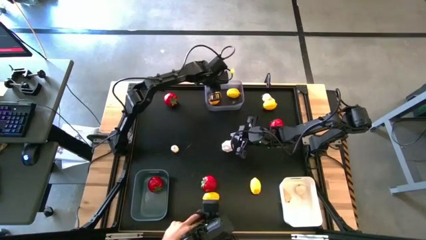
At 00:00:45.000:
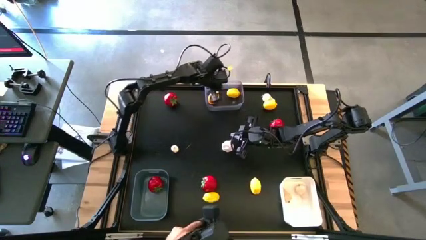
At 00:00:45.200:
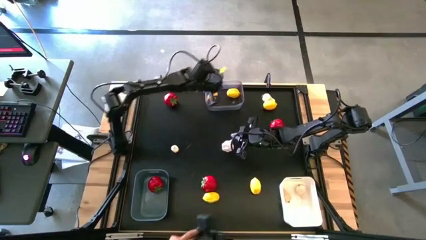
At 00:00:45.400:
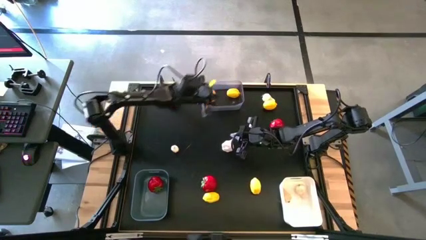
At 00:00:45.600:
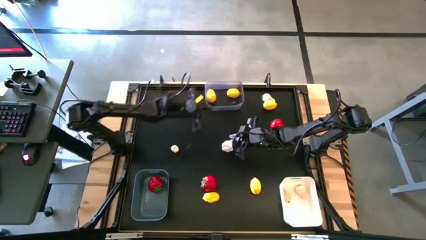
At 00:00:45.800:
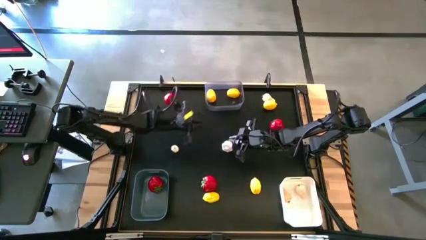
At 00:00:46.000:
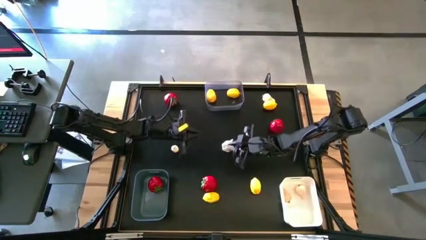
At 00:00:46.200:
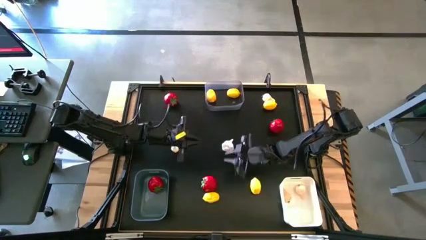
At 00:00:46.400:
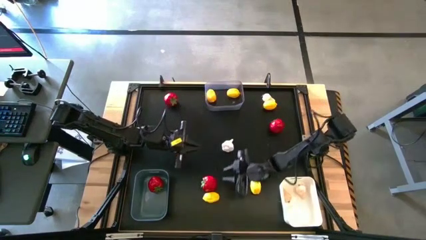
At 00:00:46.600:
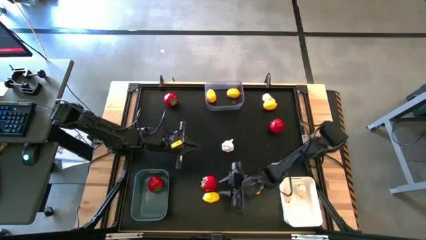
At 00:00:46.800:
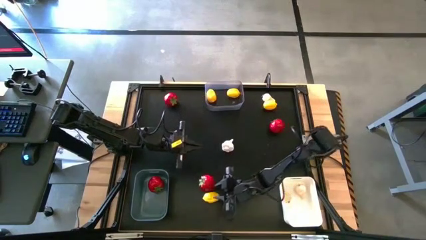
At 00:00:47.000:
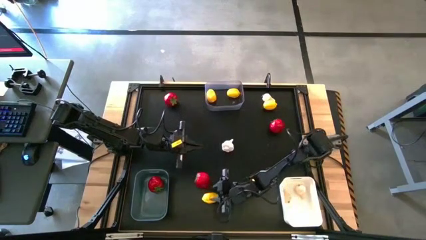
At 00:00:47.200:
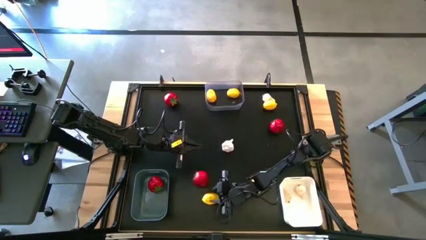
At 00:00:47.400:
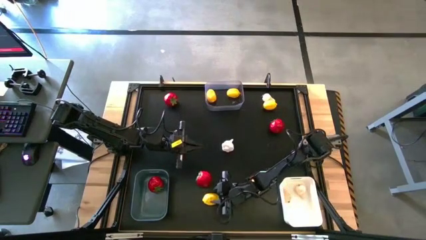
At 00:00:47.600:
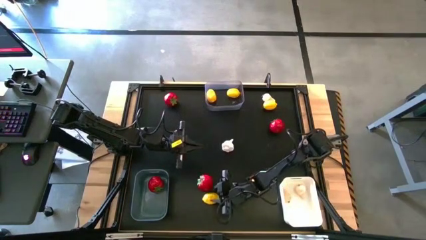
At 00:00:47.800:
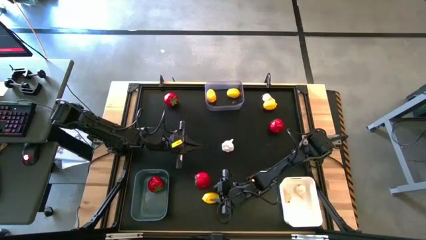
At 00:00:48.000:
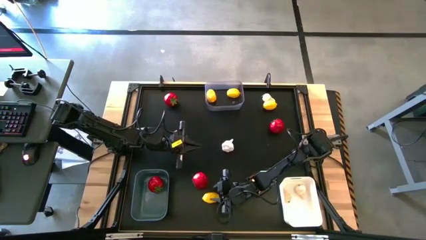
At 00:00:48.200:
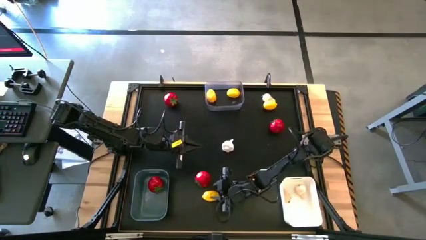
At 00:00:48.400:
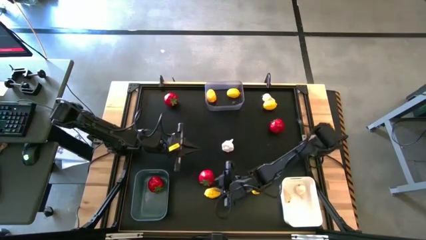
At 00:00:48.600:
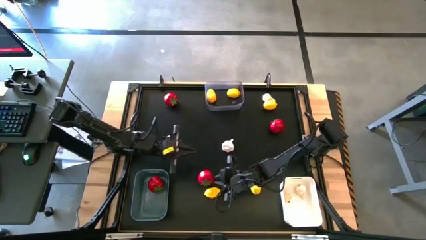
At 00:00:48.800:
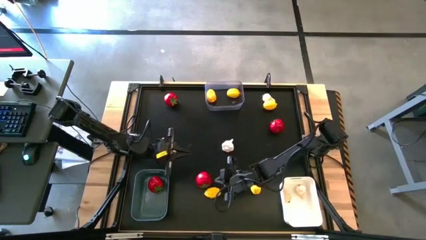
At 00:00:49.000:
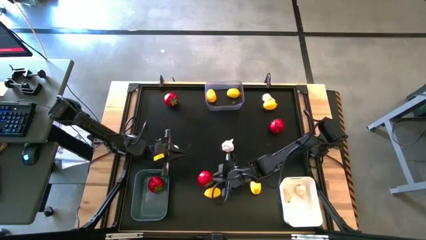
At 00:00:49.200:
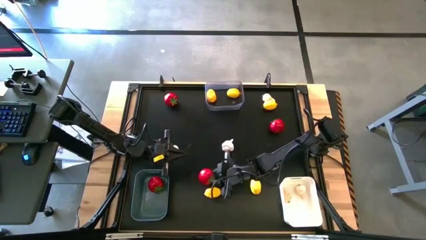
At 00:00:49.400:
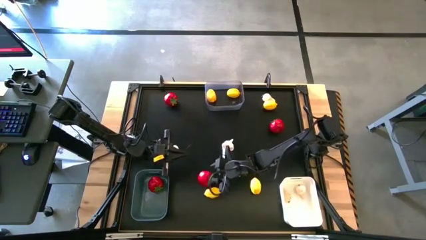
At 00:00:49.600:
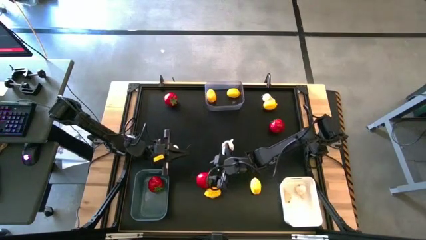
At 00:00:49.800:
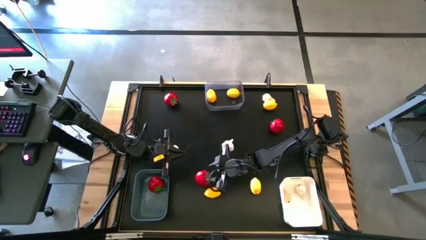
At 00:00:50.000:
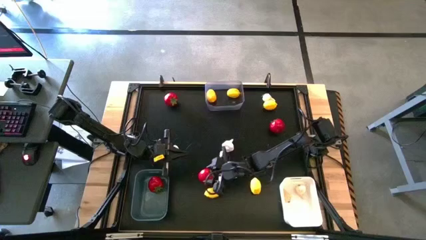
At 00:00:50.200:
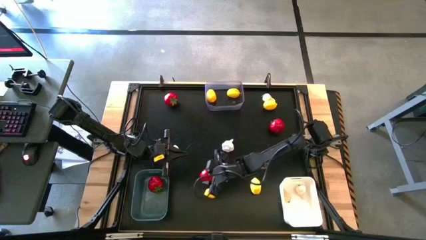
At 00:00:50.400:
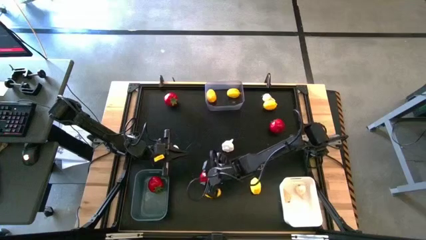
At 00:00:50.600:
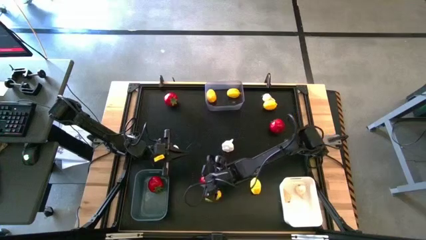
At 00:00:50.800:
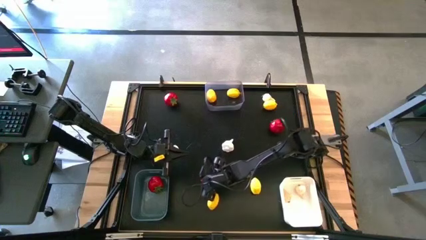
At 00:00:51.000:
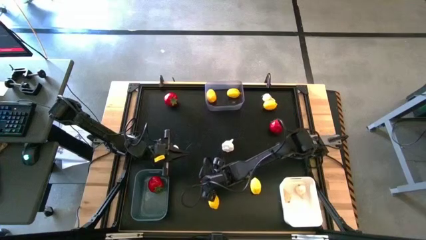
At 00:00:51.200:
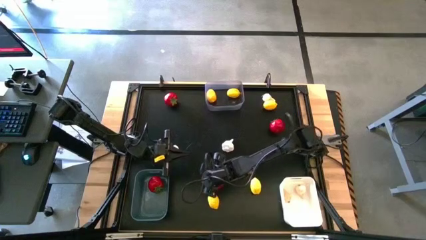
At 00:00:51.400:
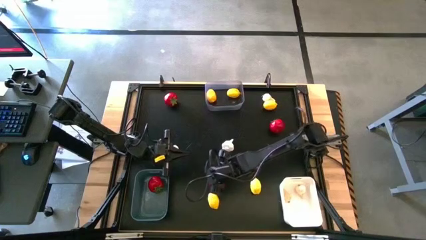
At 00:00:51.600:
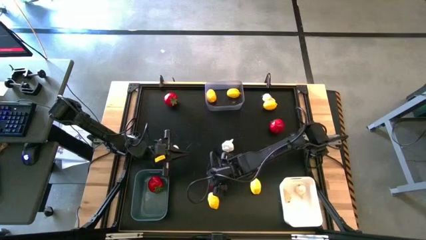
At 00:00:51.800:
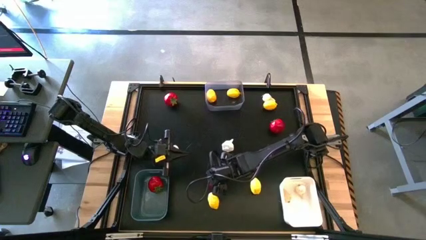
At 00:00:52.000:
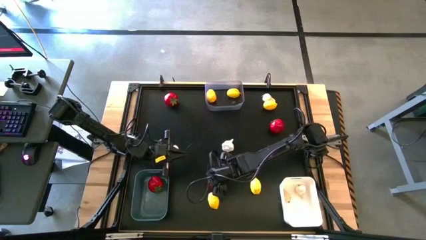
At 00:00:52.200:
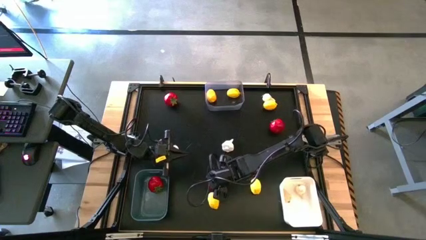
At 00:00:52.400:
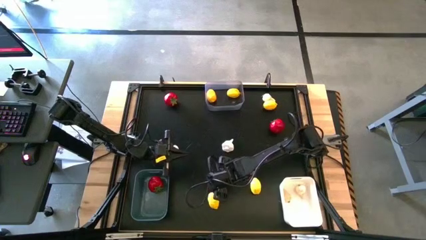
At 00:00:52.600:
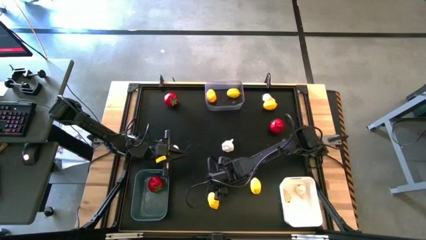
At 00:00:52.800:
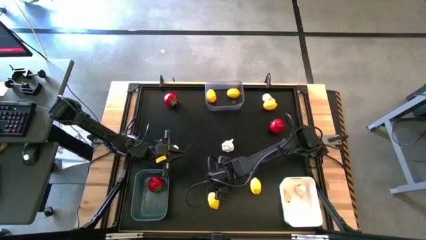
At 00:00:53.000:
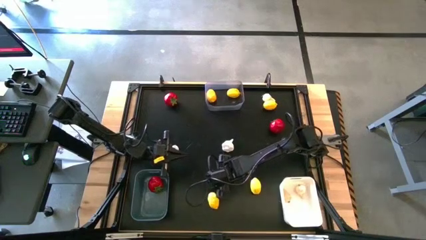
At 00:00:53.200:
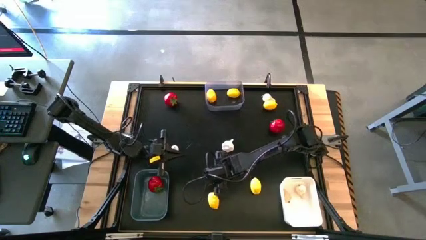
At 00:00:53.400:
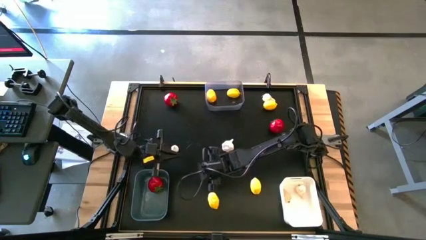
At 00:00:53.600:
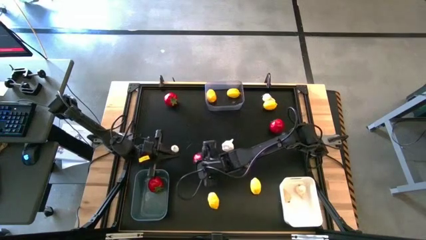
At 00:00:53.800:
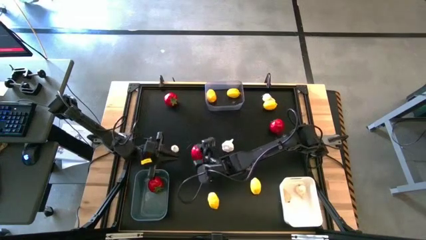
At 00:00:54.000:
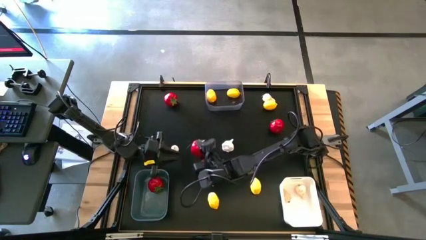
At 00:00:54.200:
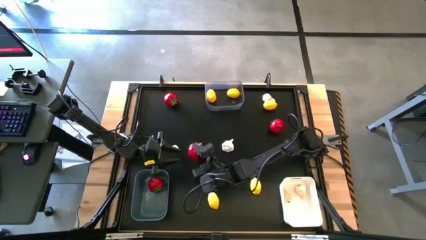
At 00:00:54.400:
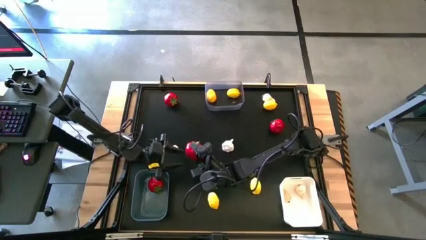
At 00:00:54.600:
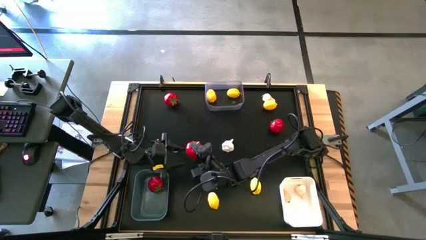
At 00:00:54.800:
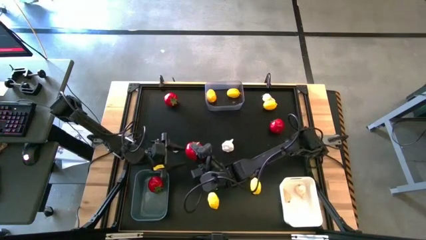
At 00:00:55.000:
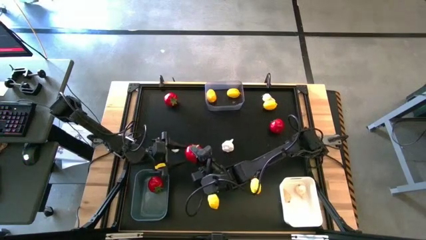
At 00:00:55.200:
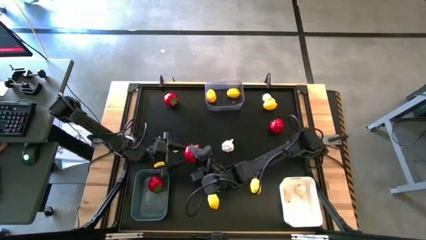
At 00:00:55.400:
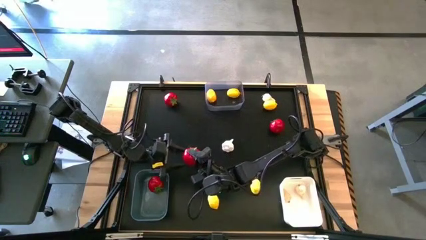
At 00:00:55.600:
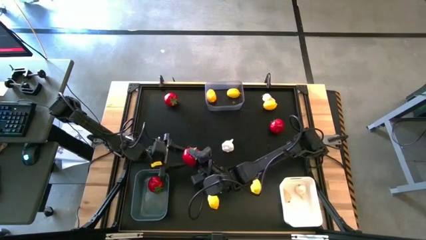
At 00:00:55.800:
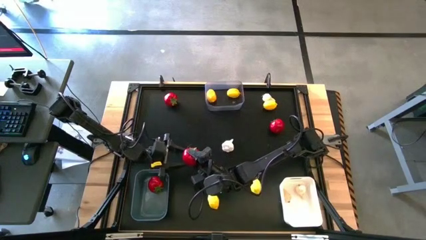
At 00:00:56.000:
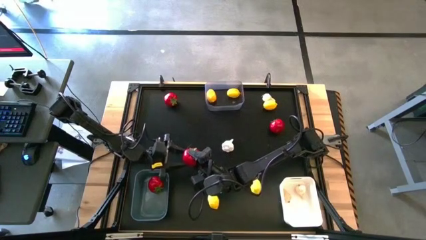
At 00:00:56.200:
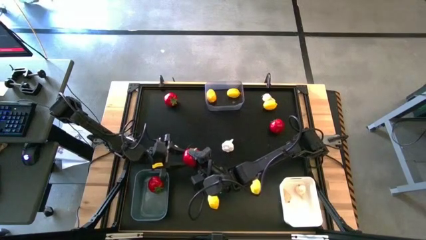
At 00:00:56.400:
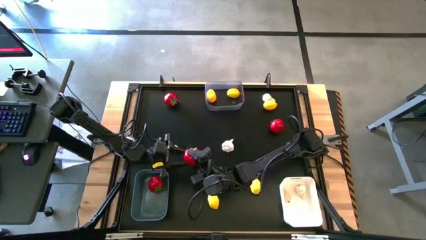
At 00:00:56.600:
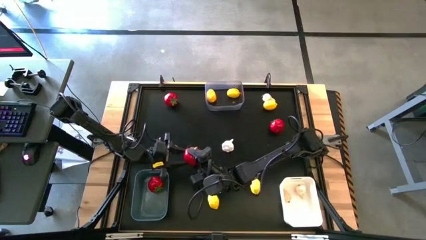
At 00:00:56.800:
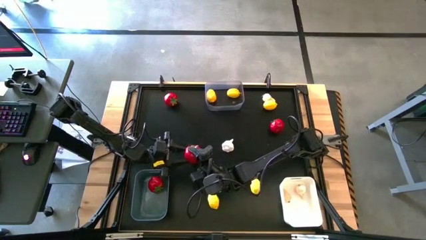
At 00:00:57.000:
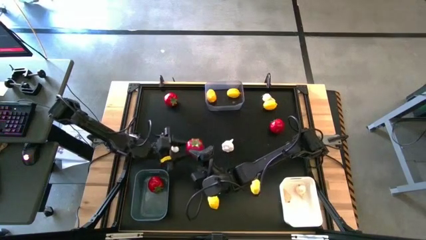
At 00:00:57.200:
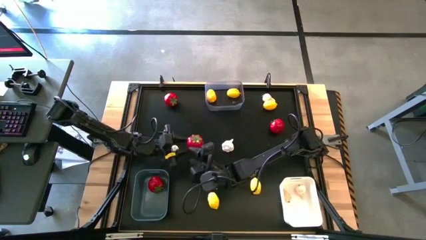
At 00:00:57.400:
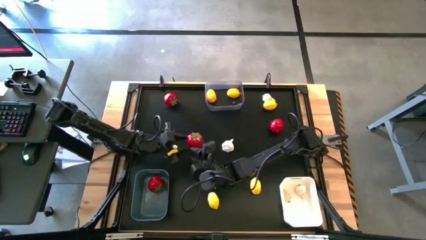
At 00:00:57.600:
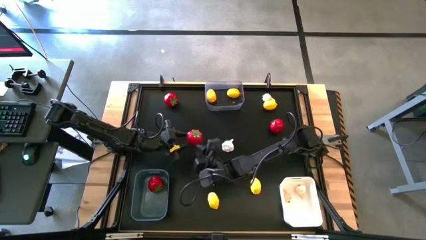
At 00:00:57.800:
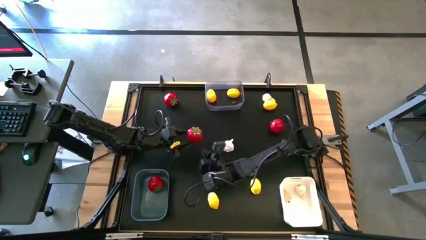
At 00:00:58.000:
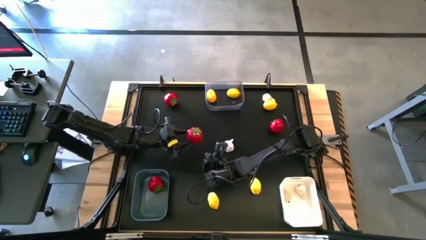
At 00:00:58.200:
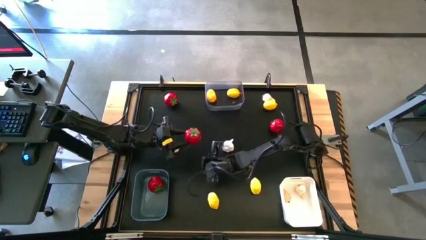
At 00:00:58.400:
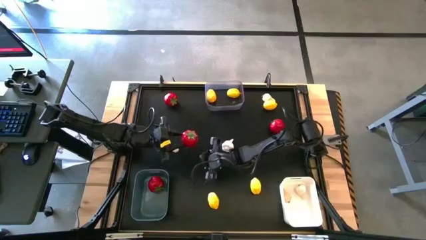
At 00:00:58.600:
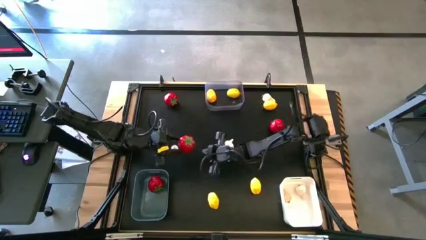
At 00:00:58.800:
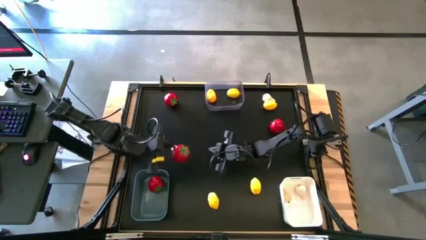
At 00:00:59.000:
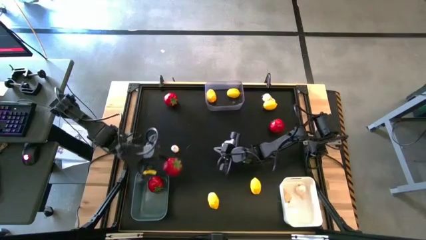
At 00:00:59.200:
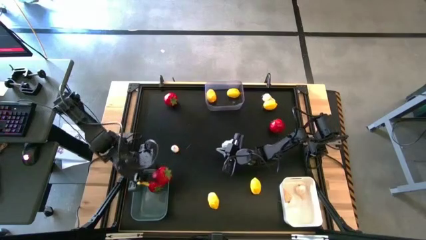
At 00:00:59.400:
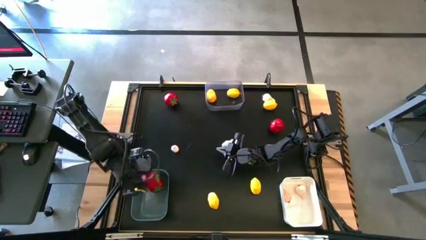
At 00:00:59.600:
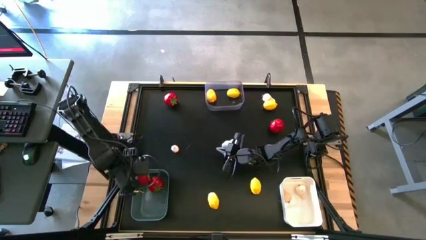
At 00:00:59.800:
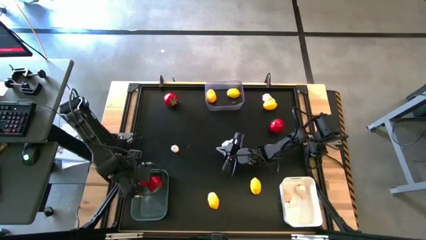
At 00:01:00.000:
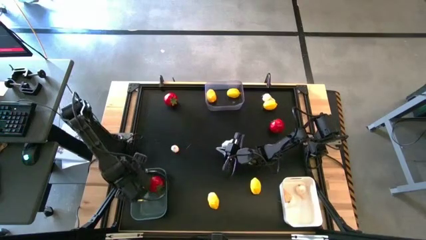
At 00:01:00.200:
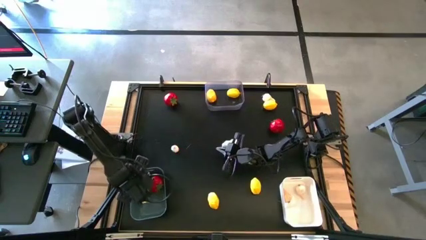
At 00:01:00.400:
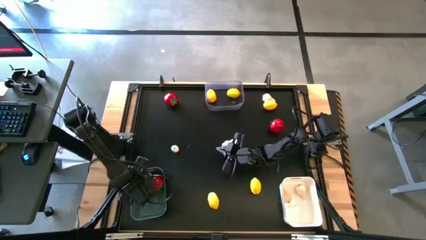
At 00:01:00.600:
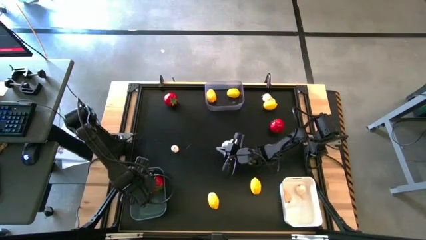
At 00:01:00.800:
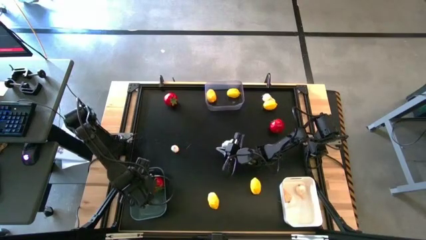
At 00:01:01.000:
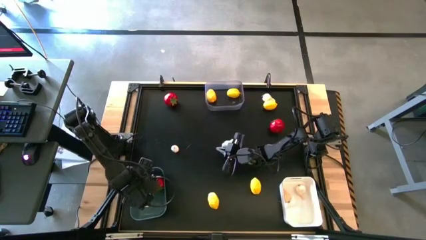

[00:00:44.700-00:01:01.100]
Task: Sort produce into baskets
Put the bottom tomato into the dark green bin
